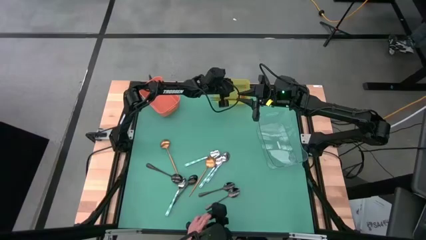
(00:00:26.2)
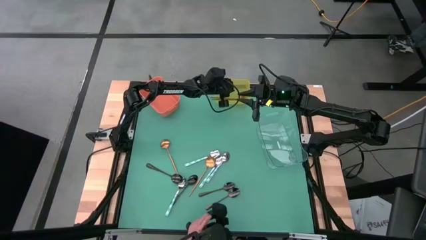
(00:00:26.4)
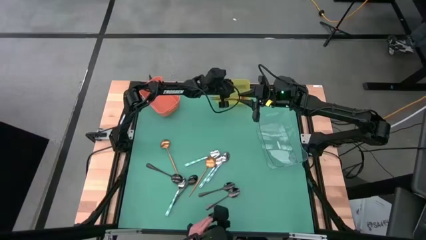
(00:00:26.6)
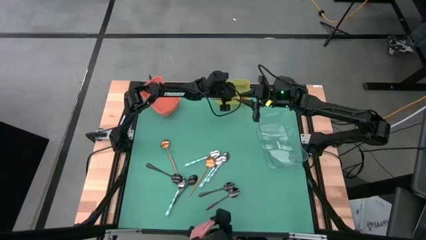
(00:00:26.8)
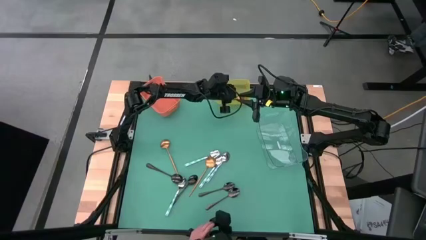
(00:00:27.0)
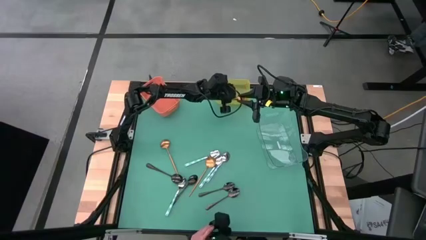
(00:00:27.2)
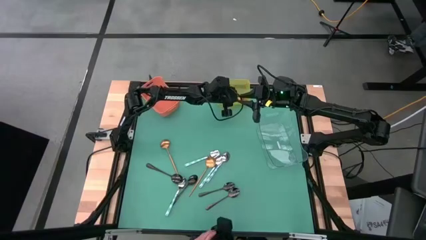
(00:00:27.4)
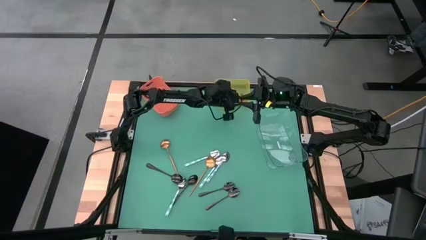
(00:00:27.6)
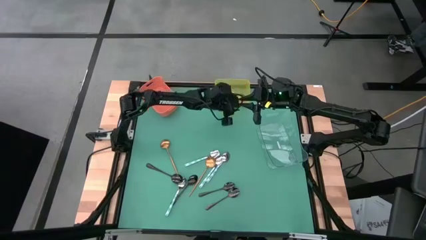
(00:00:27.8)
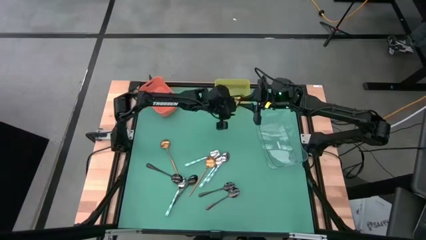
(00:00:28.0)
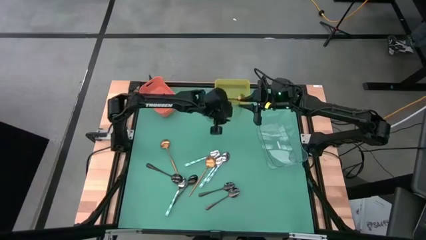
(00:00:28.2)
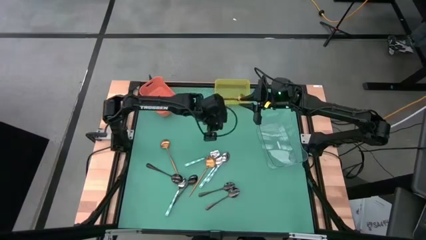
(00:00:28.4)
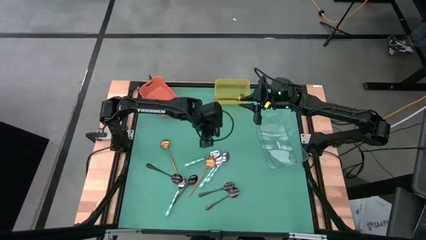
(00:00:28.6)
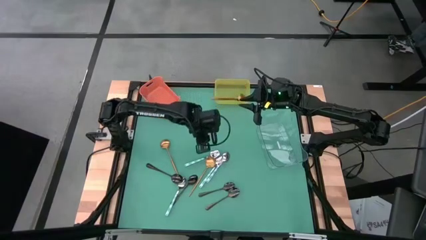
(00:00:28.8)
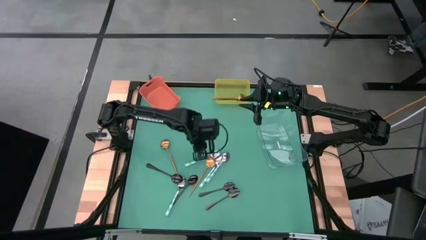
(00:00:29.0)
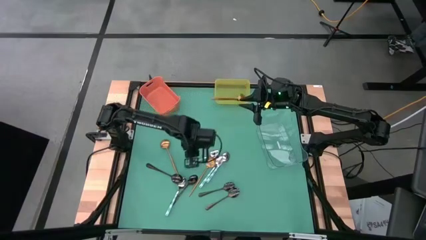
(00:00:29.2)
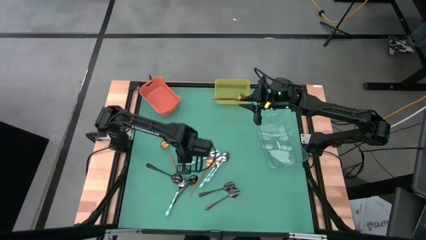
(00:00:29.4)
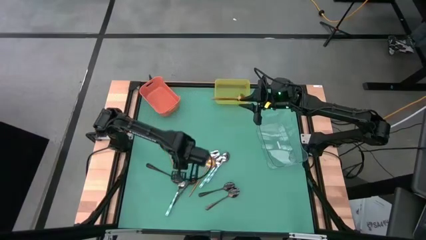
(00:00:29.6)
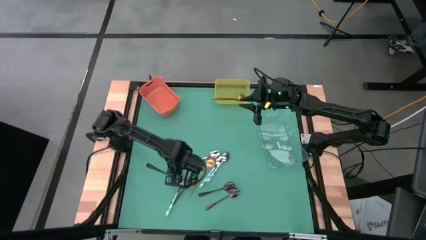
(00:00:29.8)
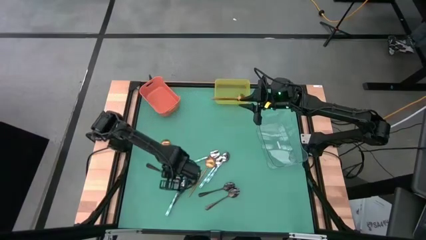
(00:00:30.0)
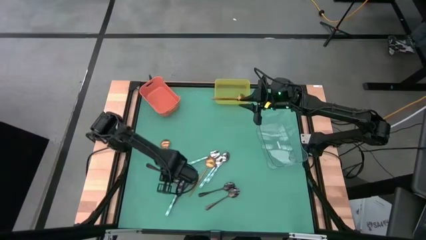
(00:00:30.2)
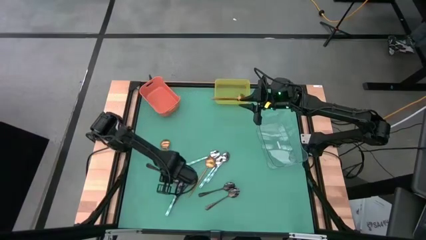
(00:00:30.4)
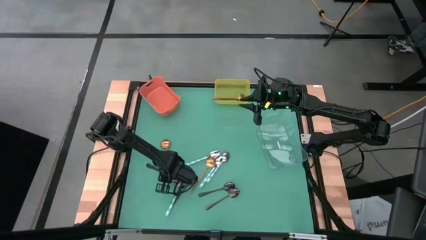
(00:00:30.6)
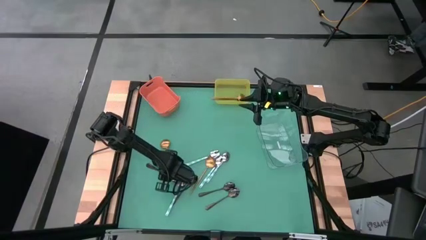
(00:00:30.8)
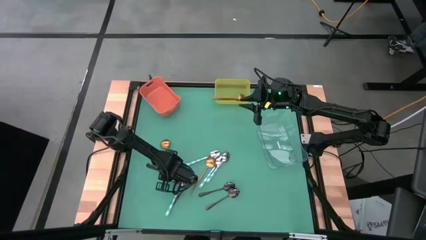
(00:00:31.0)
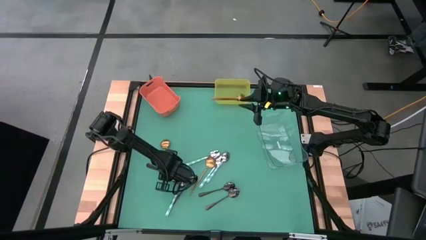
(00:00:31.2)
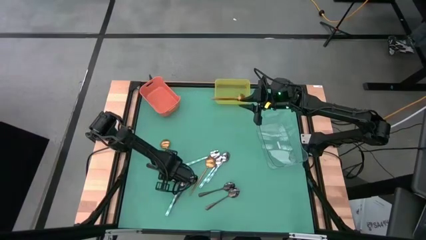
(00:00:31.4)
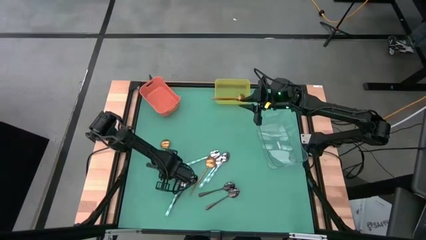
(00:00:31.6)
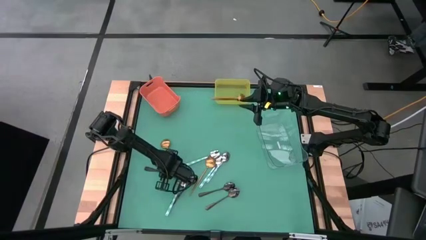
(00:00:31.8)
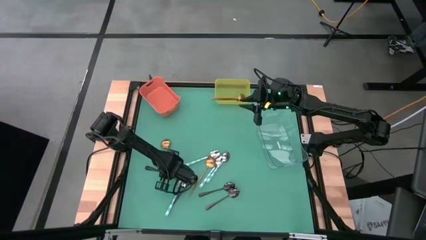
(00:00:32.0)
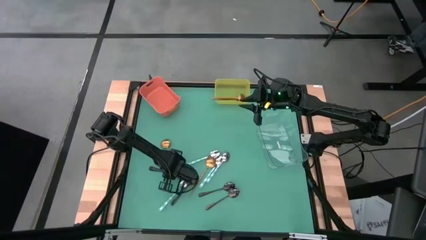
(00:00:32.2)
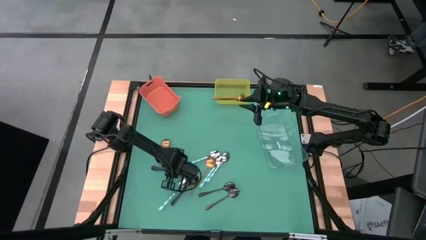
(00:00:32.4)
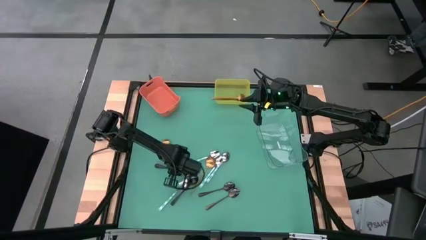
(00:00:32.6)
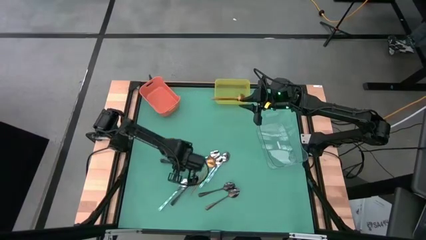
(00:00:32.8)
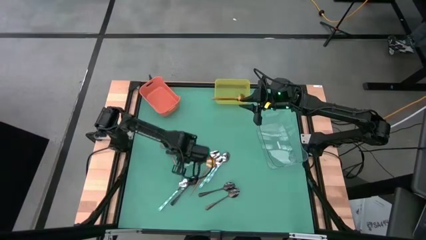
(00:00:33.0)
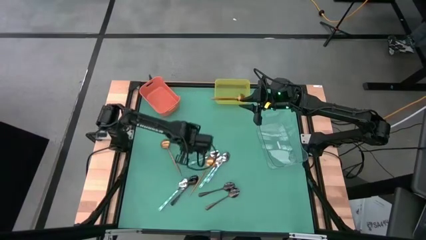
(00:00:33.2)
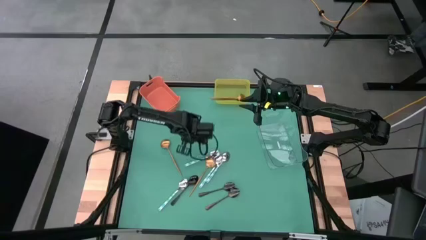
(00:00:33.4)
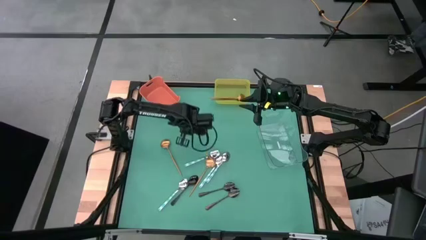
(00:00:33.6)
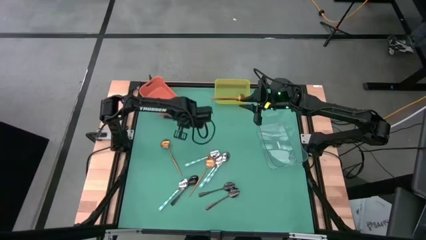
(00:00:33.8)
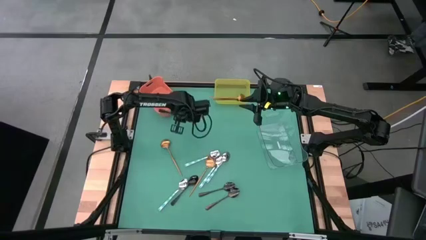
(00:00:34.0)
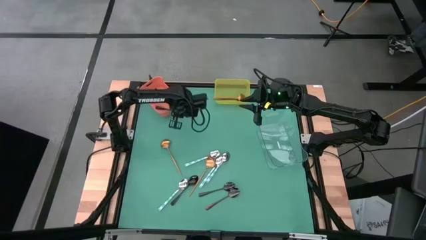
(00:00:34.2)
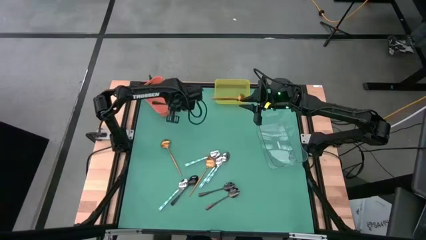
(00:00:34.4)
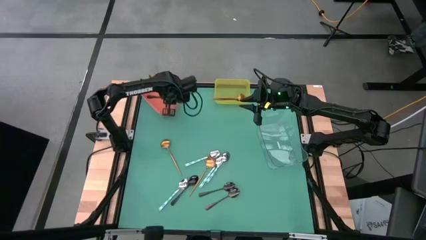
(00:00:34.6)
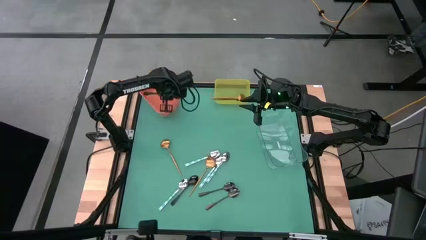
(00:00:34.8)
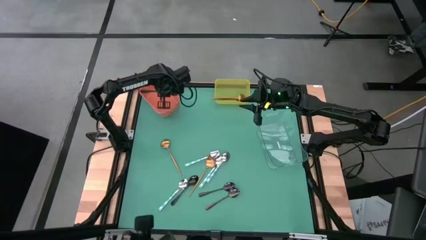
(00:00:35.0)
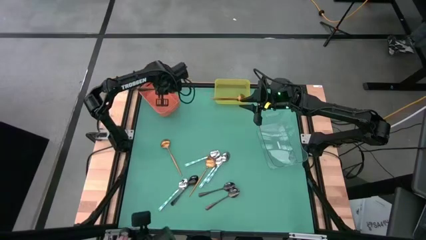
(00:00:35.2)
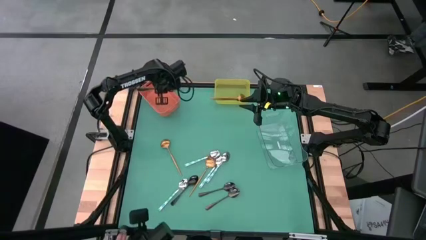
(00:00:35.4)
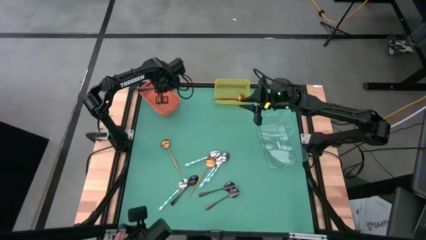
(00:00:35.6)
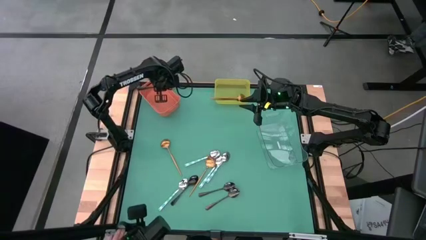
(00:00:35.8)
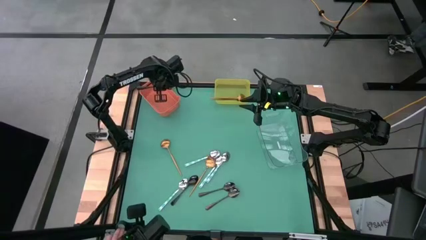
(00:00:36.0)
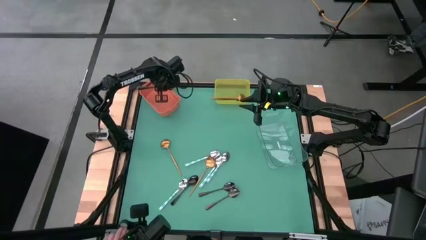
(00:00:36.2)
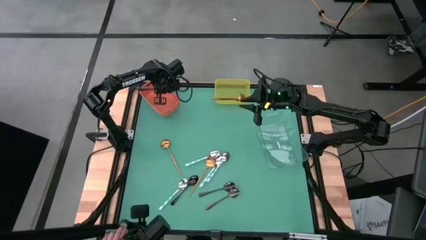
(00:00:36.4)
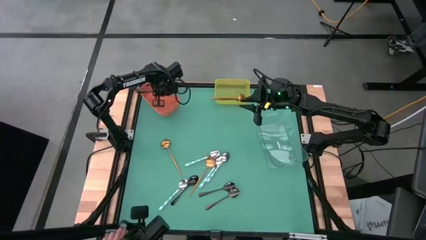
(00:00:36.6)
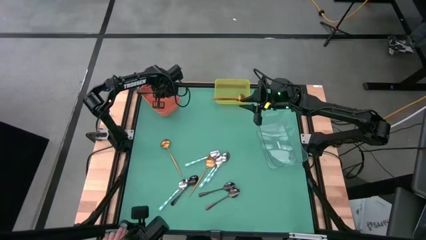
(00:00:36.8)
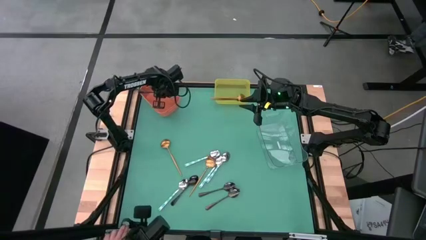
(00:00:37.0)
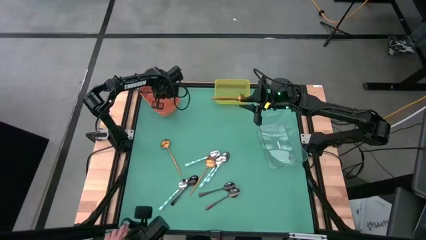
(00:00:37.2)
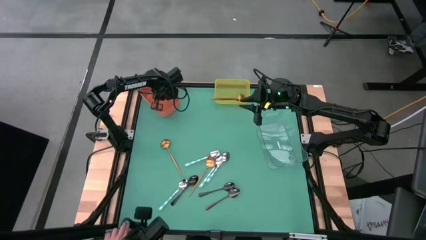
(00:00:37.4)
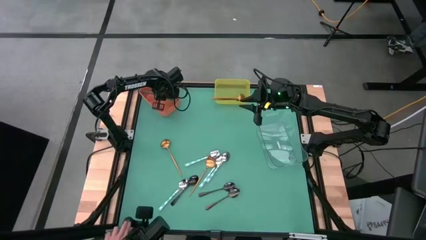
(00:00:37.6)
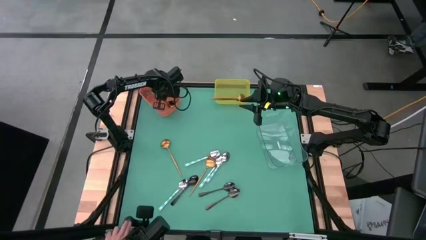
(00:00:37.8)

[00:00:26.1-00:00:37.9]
Task: Sort silverware by color (type)
Put the black spoon into the orange bin

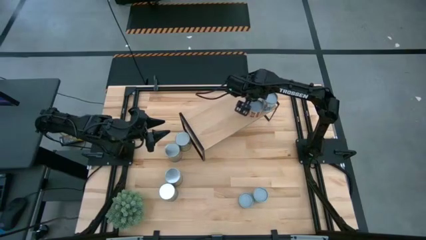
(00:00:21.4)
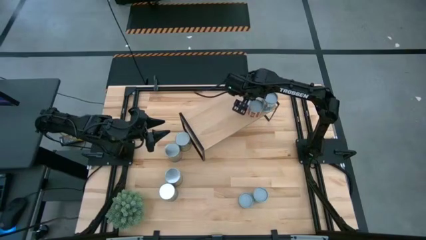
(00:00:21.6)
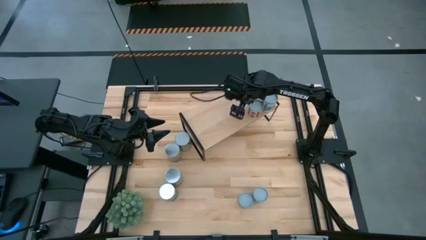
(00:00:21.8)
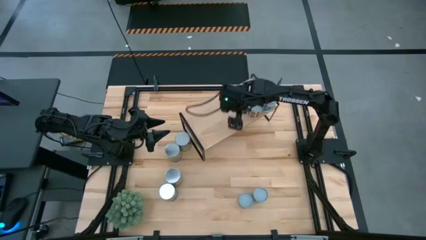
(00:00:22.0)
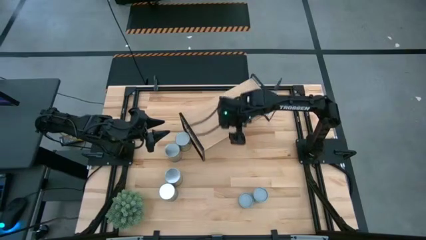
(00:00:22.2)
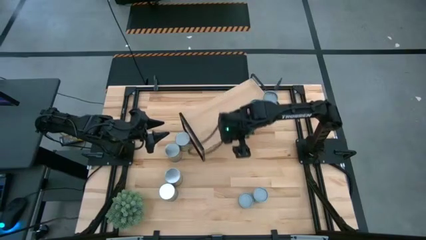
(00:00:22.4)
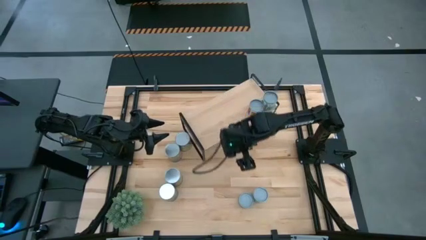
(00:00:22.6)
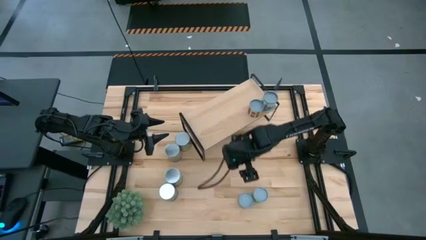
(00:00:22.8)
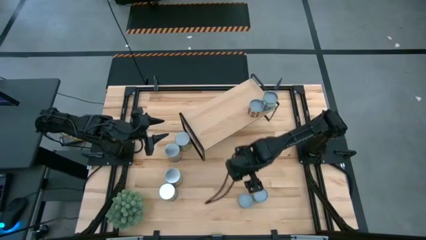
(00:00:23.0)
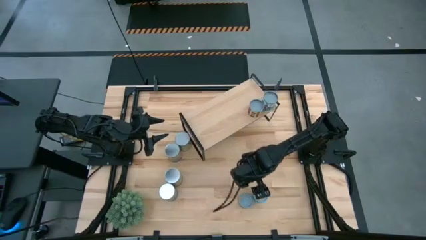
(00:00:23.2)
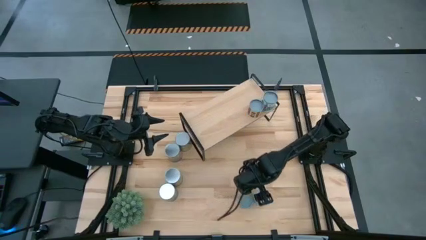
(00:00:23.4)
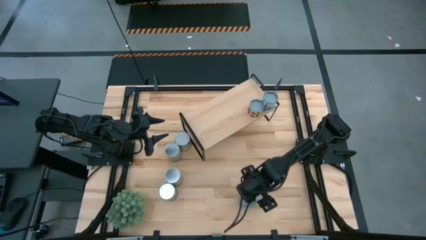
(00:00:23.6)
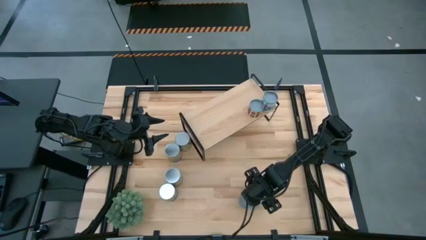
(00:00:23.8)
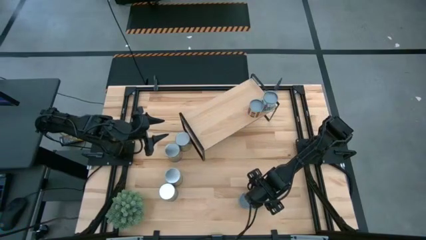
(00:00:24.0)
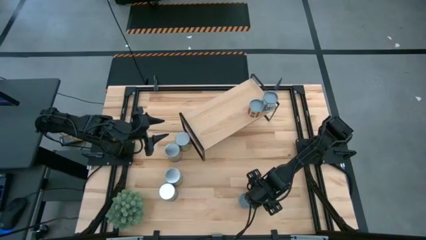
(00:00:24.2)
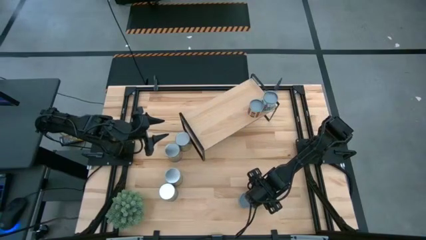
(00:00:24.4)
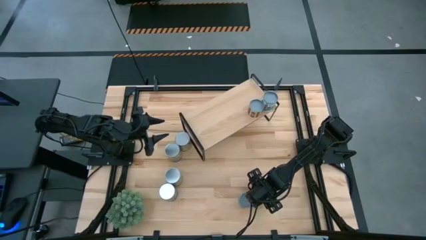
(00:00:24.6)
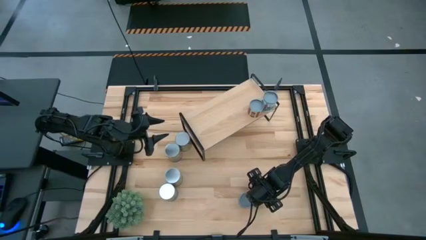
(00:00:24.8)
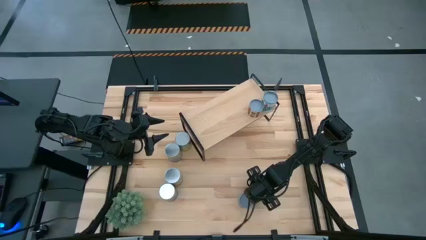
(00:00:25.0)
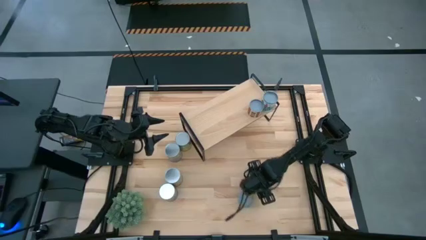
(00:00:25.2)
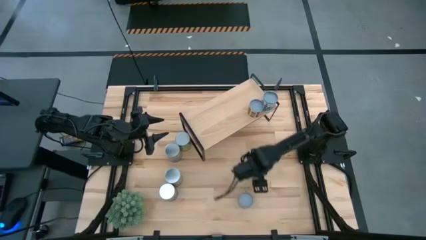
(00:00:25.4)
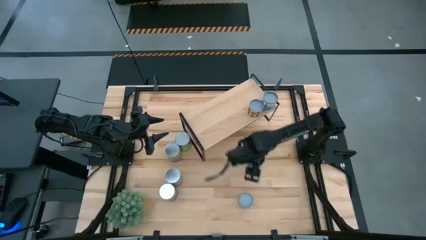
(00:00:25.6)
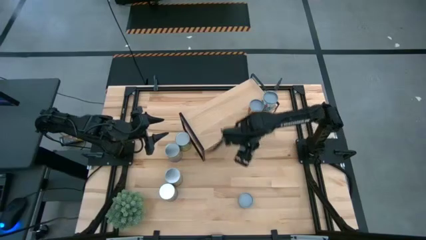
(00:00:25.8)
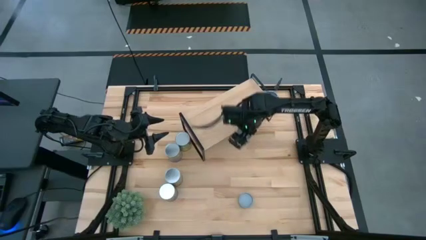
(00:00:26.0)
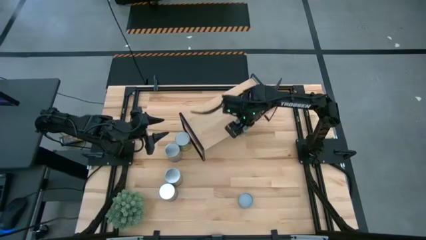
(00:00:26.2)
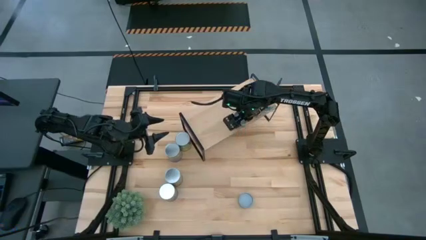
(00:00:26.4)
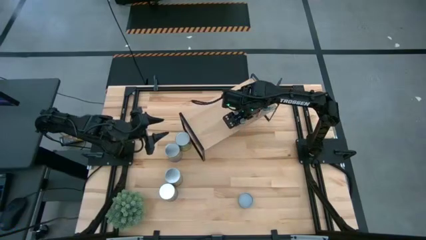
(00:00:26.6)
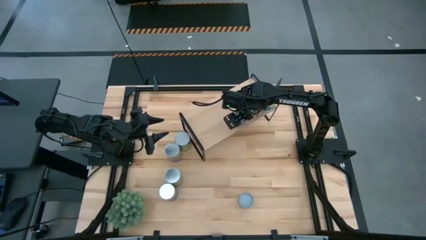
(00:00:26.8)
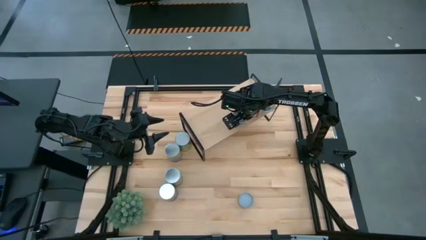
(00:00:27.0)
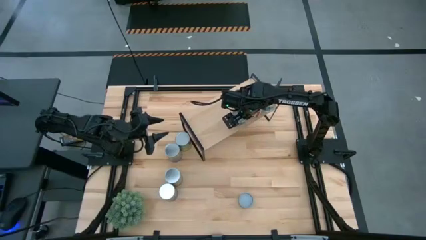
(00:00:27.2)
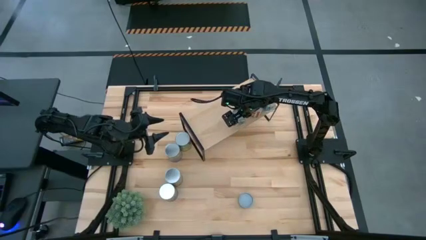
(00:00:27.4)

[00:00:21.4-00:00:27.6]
Task: Pick and place cans onto a shelf
Put the small canned peas on the shelf
